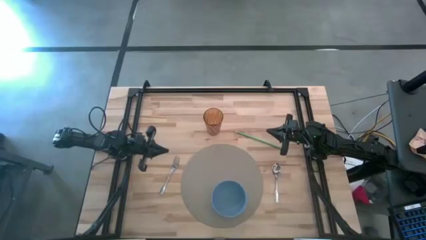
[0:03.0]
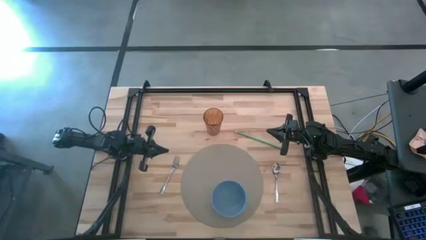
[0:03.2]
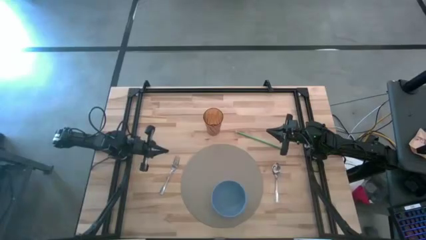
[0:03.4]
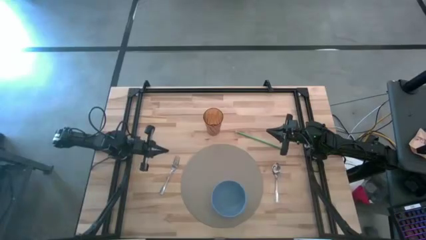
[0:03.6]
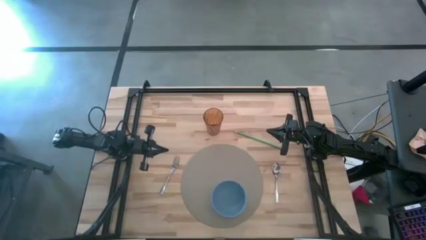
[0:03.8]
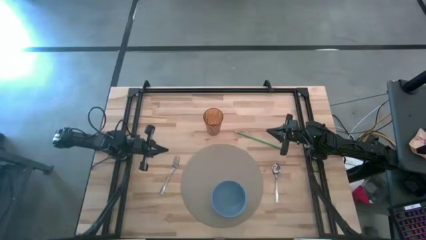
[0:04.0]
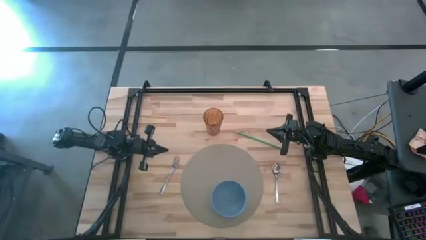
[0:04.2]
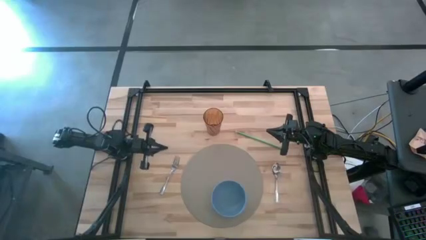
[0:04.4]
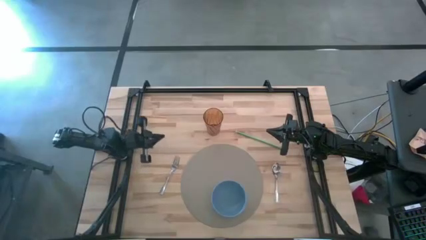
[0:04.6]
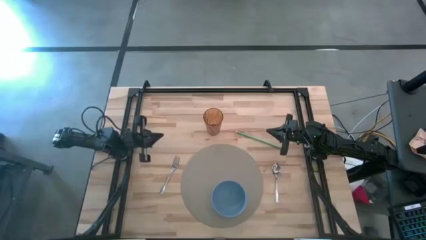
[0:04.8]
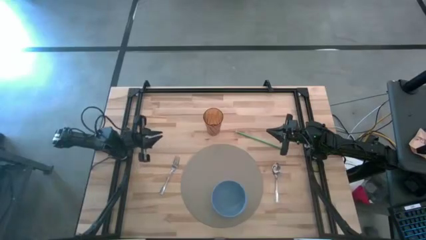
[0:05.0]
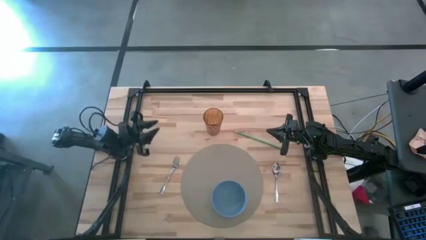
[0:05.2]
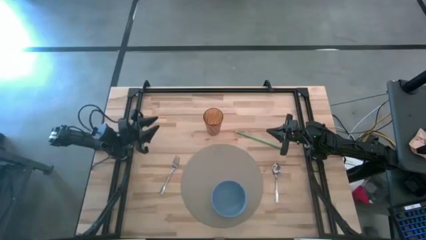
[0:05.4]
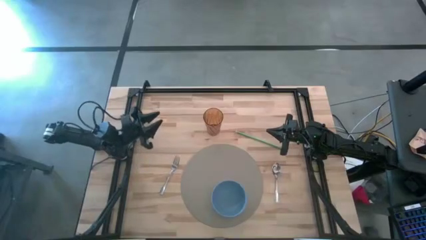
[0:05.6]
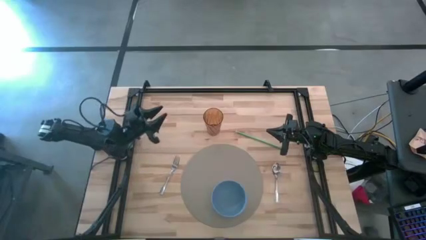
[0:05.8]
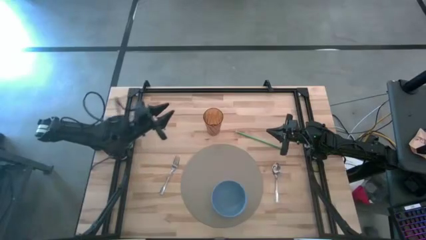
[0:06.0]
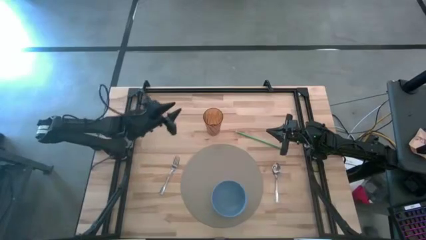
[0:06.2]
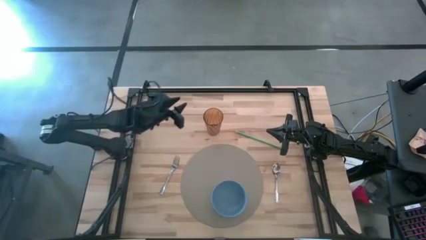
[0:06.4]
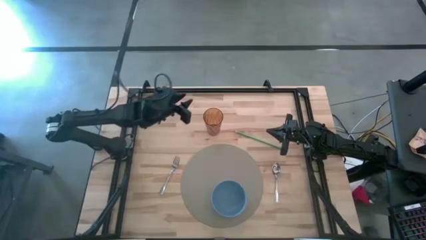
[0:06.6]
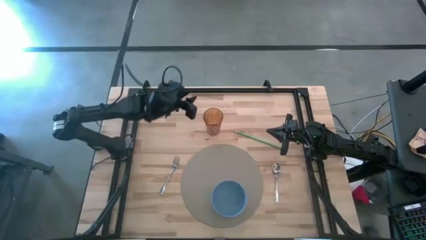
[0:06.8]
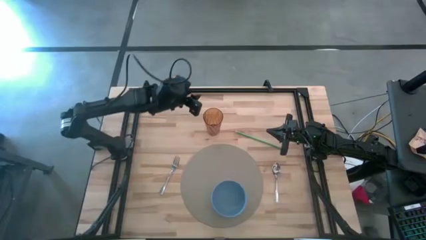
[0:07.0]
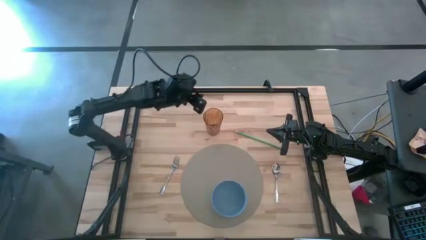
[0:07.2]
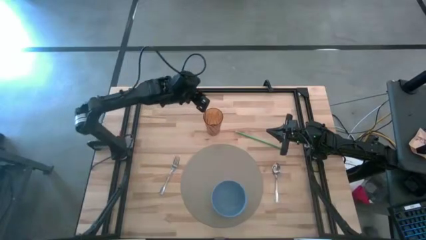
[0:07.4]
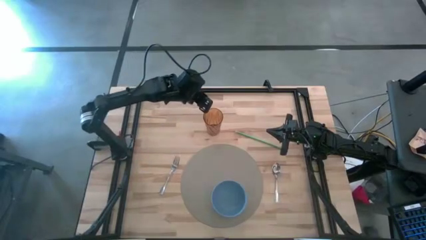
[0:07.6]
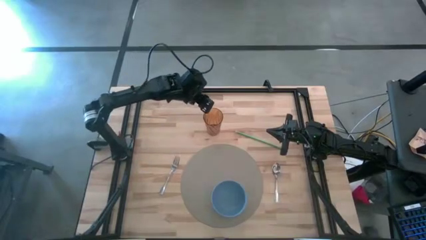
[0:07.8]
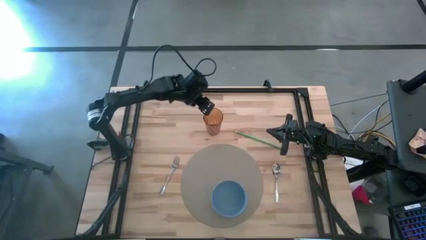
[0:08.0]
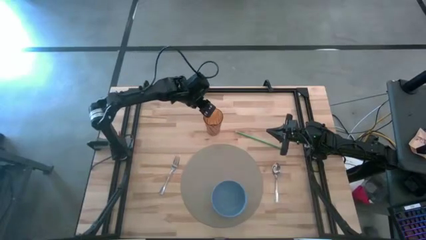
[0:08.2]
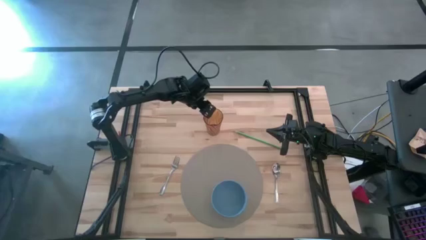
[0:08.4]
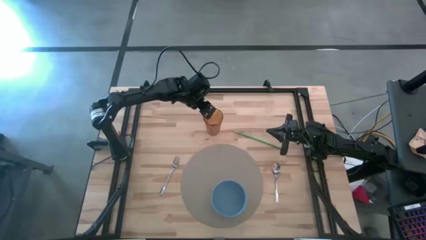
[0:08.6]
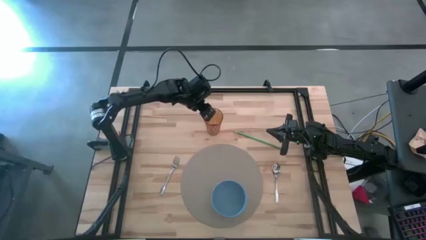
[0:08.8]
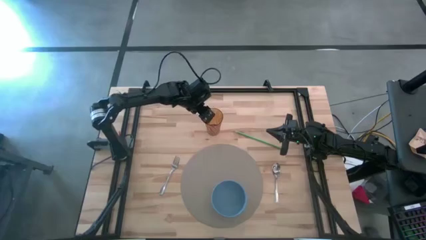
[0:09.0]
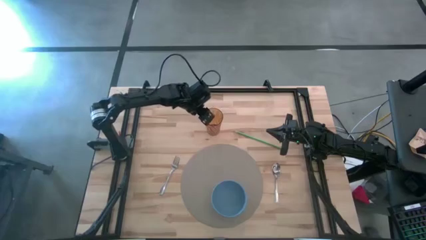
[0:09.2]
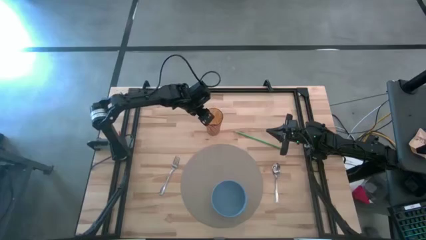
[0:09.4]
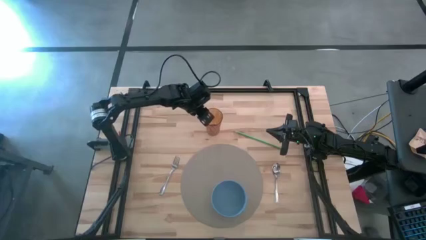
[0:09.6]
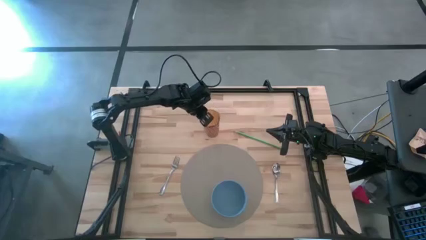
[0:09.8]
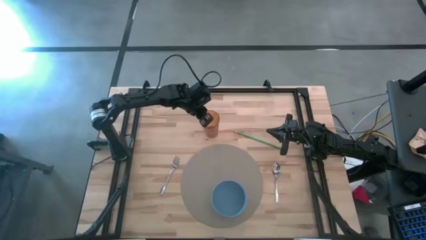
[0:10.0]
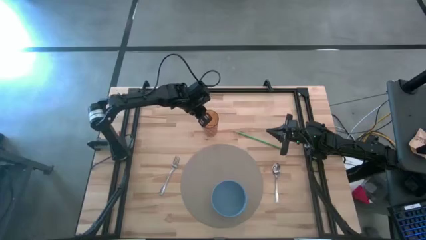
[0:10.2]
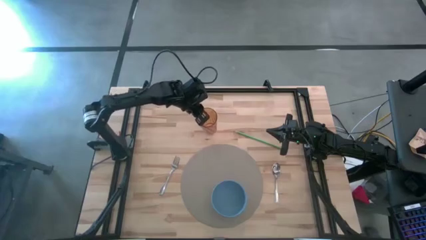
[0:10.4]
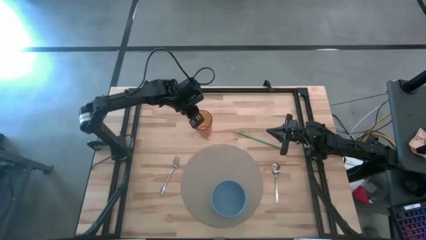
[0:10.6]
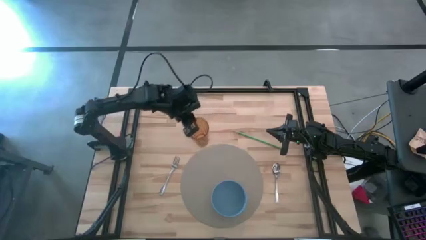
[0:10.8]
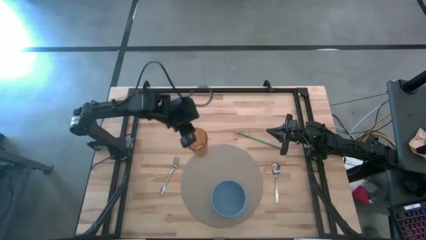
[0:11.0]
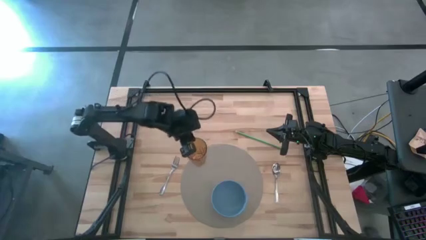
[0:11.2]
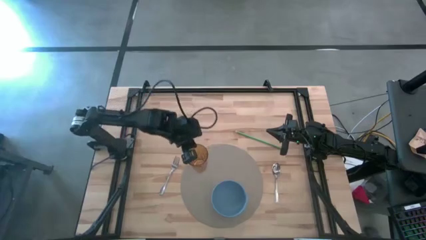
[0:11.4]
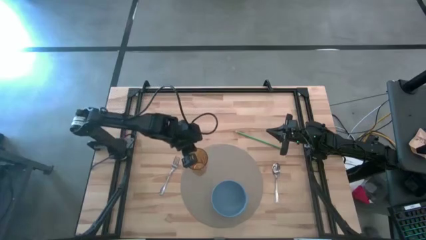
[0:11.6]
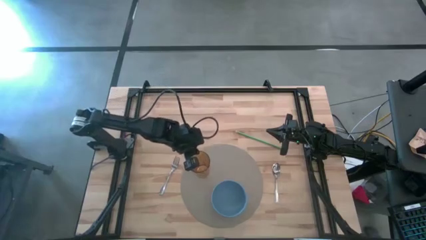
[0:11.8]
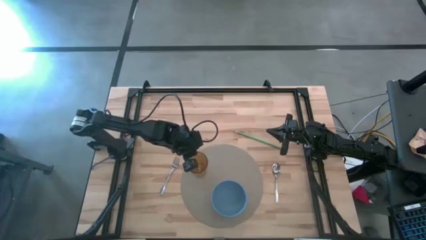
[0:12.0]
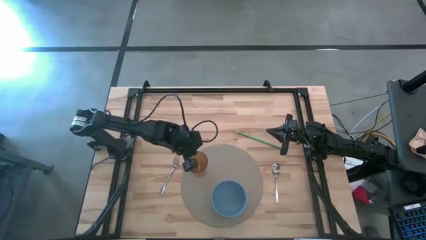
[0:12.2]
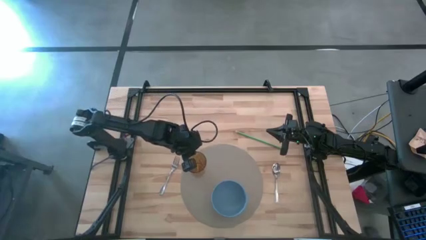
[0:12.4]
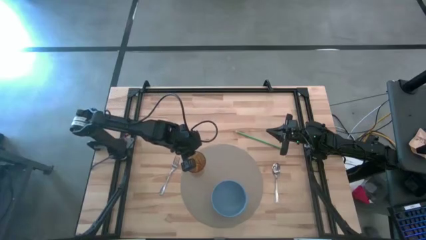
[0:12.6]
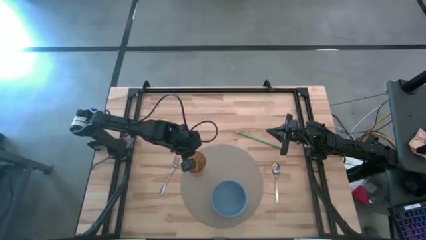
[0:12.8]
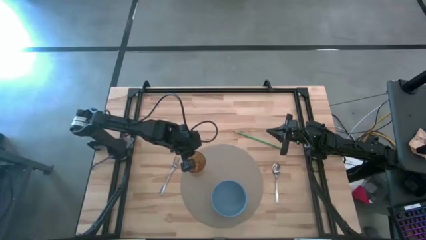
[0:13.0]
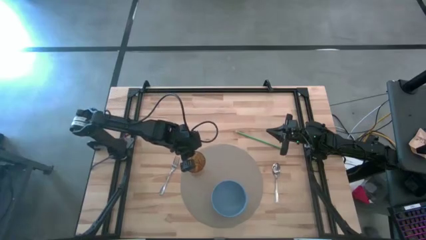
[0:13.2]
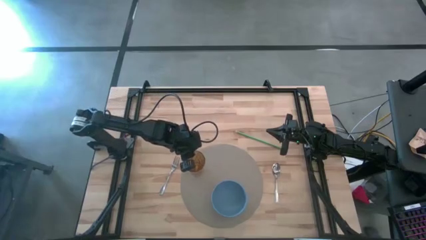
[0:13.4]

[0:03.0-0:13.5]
Task: Pick & Place Utensil
Put the cup on the top left of the place mat

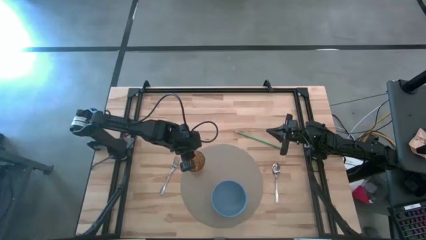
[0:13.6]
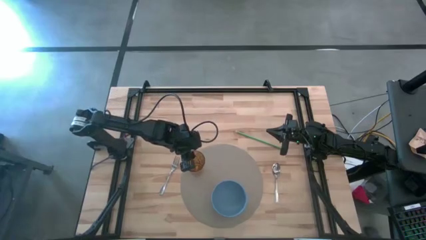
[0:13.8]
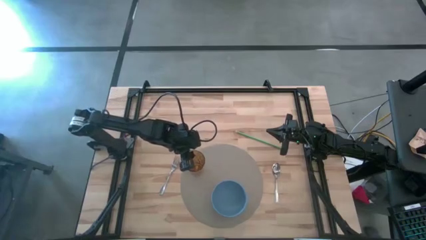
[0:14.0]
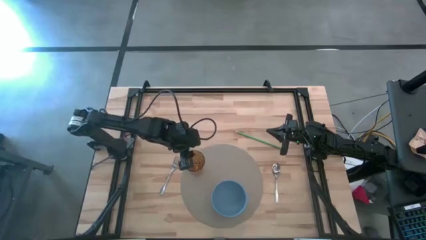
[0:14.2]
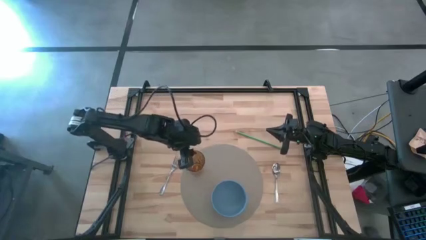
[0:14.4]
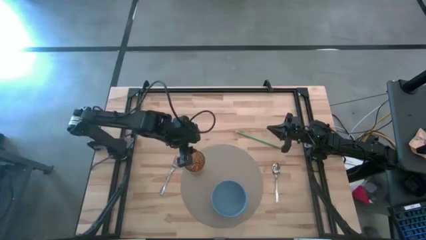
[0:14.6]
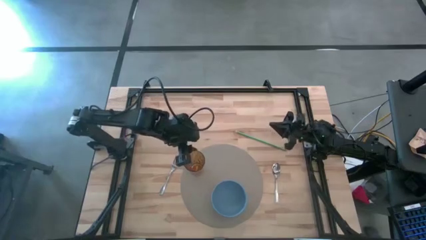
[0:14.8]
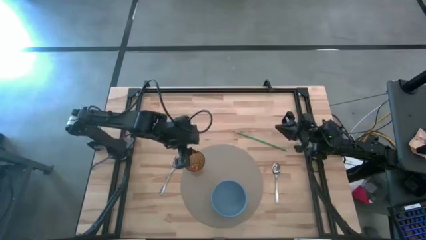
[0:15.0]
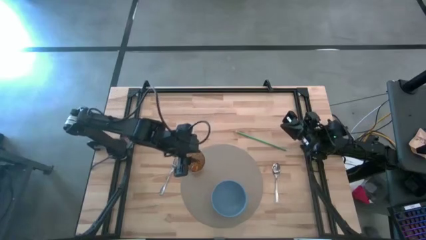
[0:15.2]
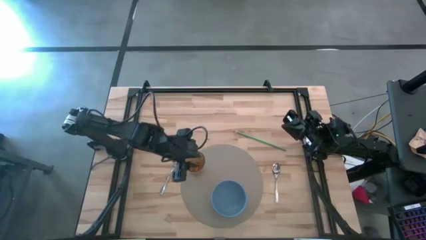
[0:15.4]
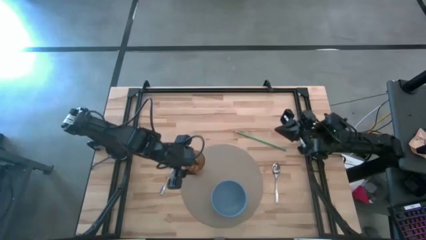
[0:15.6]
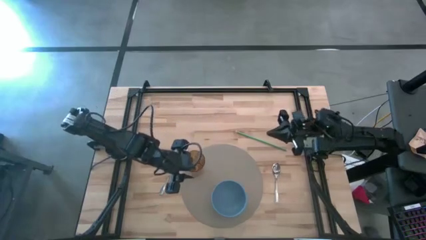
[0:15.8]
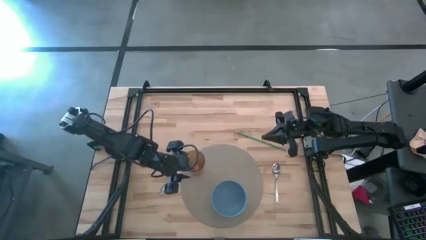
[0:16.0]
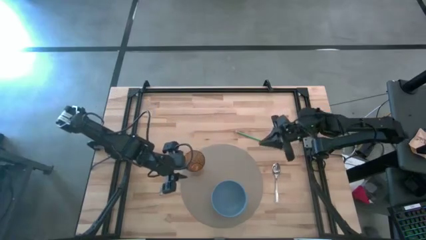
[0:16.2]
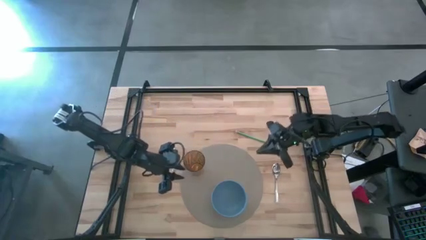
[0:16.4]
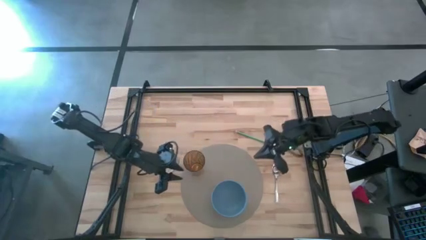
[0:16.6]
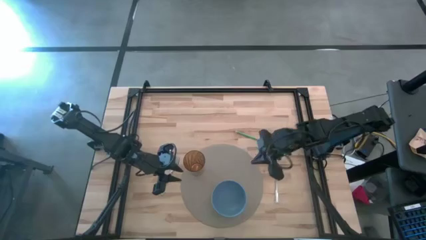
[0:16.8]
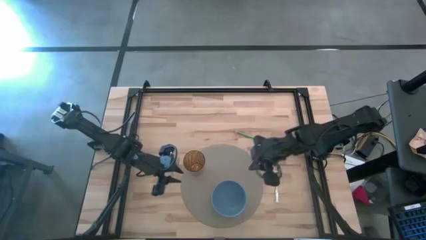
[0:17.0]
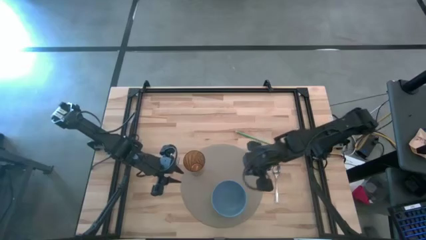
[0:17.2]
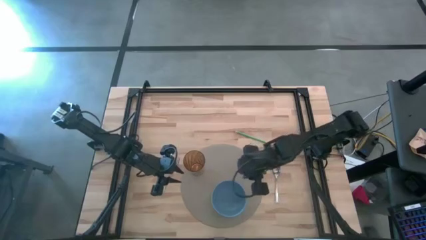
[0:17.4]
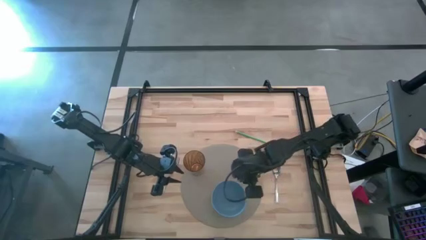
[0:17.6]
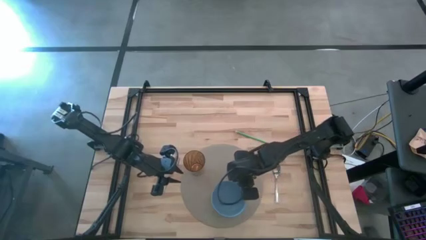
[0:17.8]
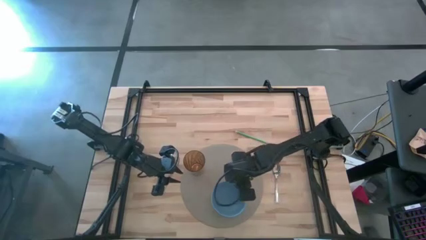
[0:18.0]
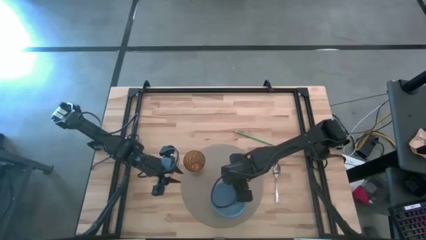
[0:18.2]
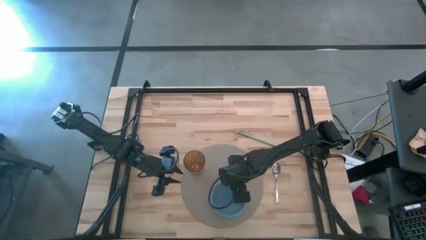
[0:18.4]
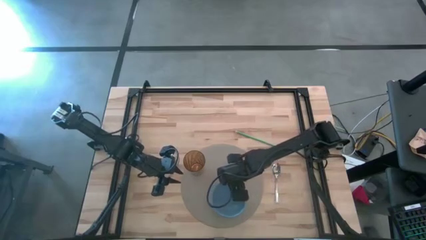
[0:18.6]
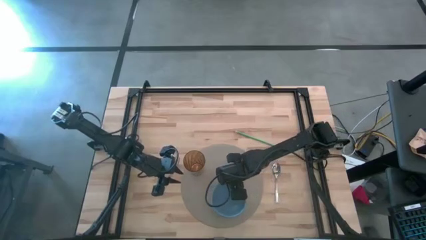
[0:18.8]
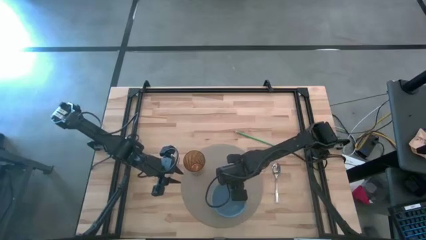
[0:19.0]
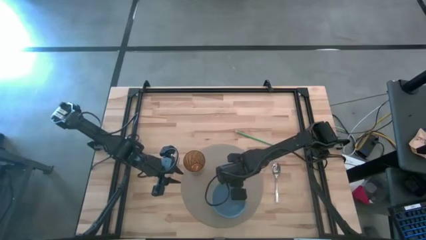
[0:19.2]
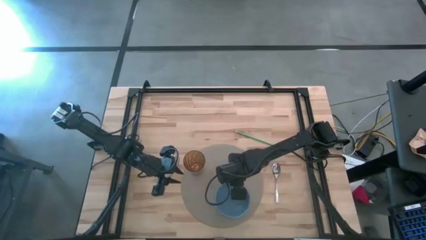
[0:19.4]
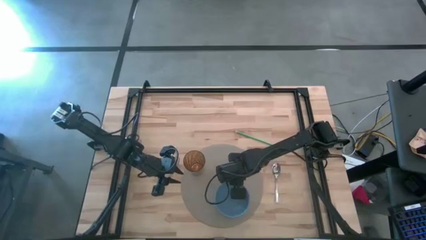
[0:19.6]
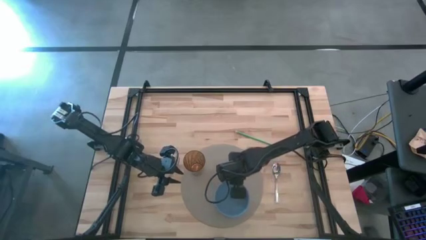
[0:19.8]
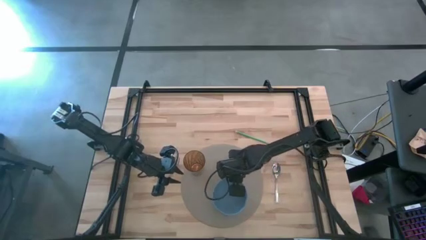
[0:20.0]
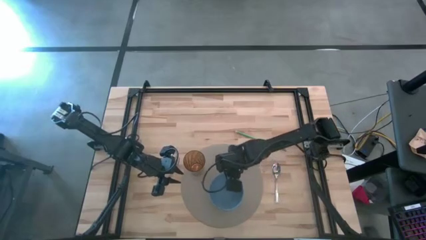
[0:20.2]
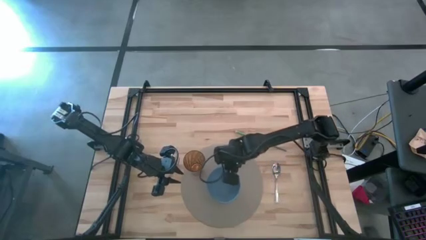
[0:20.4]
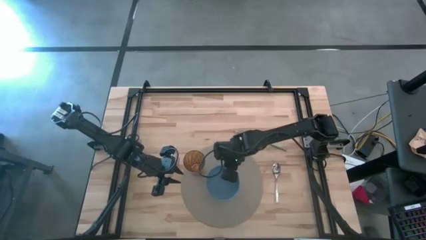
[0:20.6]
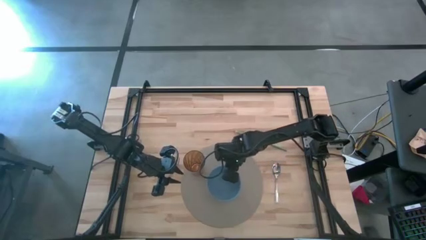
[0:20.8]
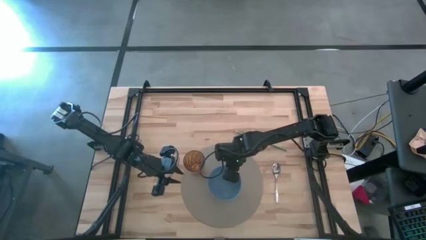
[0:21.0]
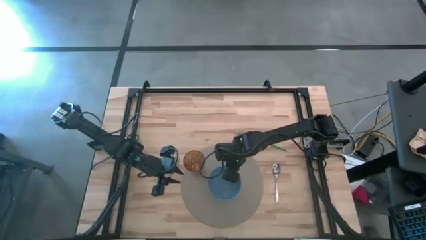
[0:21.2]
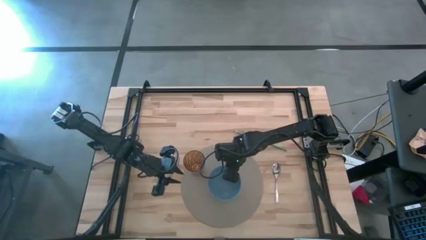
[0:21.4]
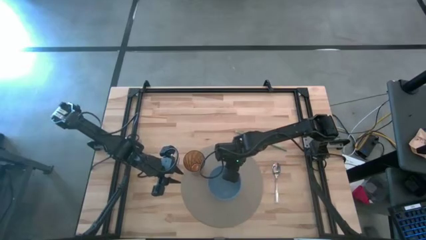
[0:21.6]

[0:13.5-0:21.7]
Move the bowl to the center of the place mat
